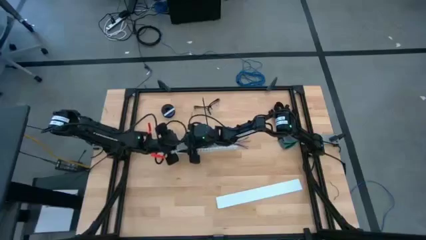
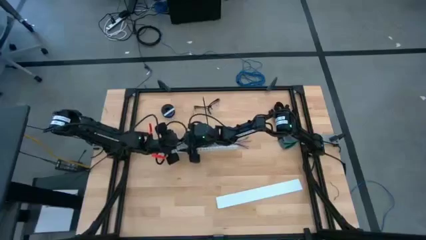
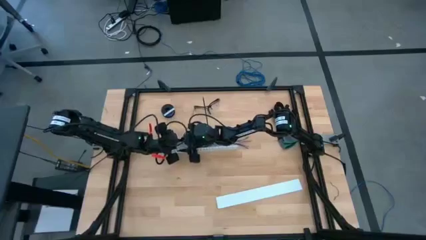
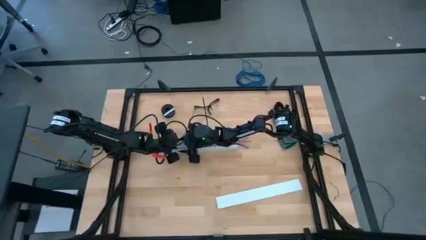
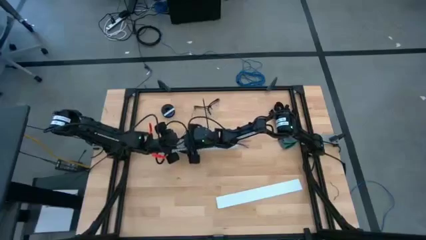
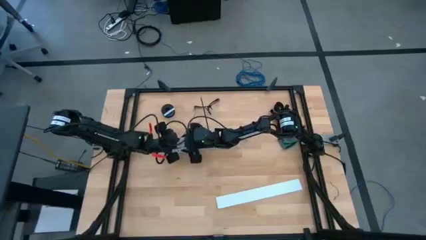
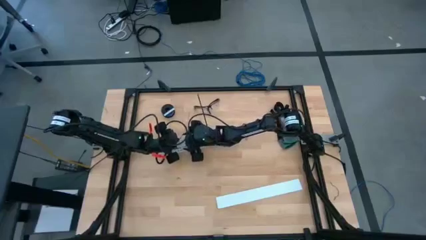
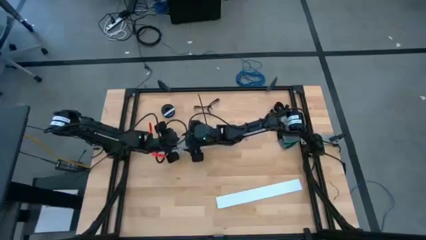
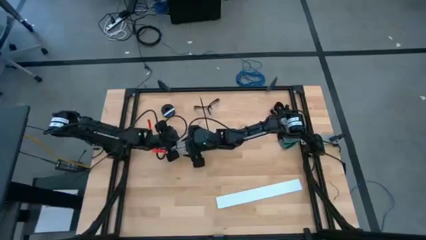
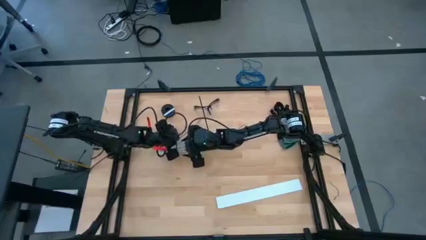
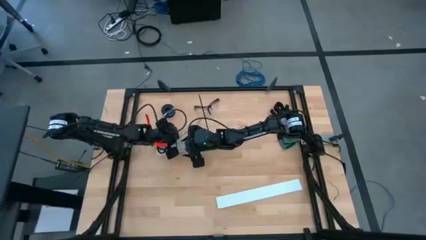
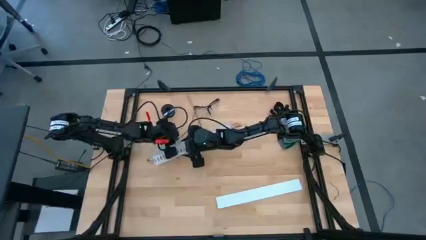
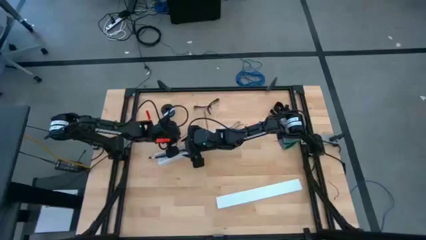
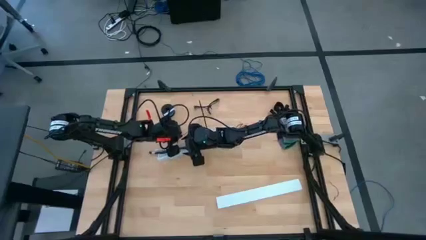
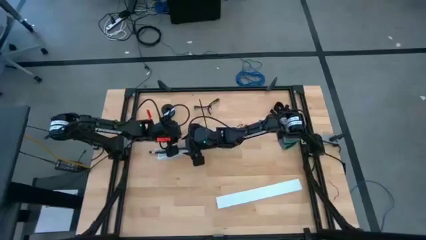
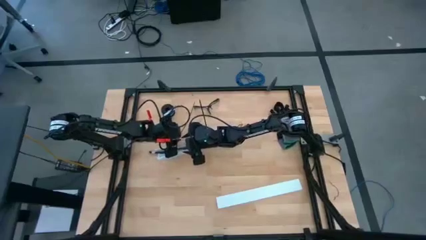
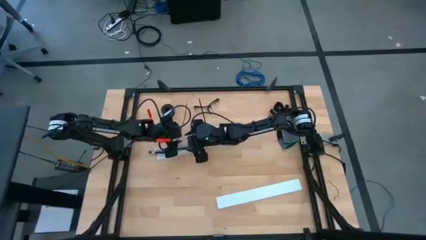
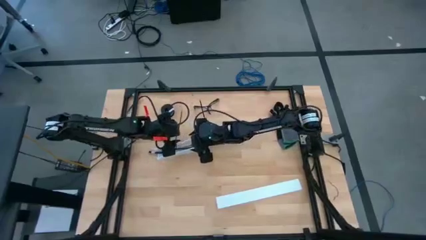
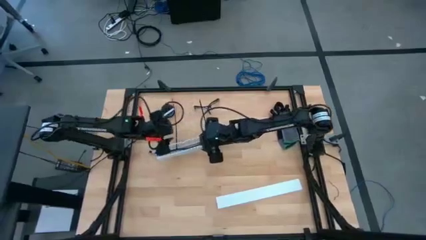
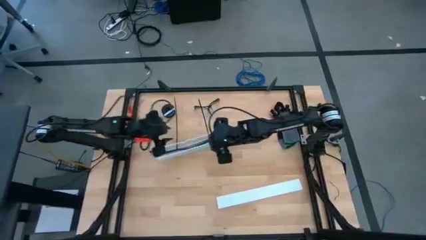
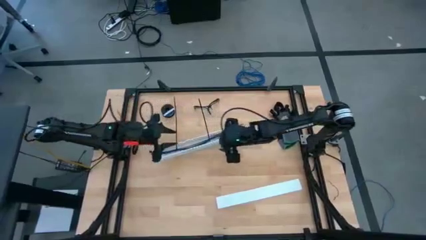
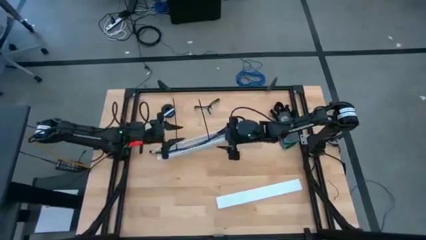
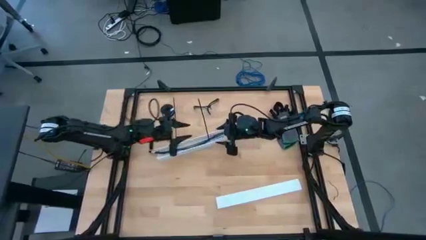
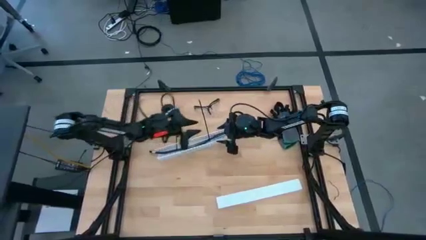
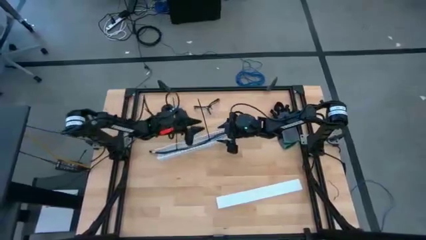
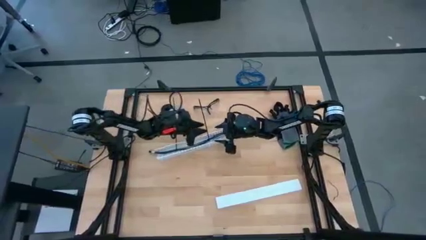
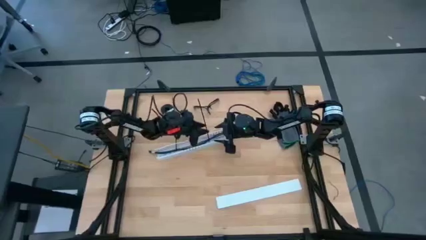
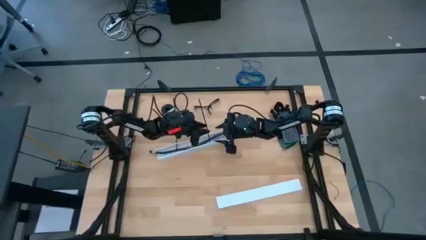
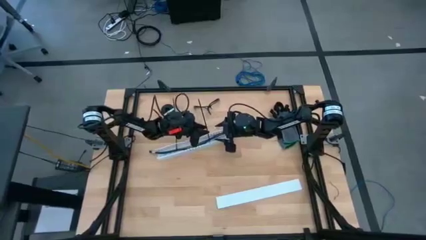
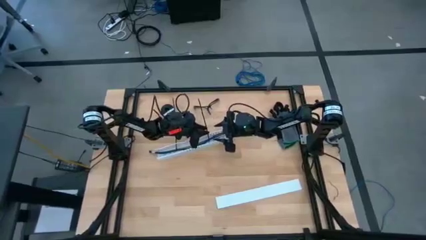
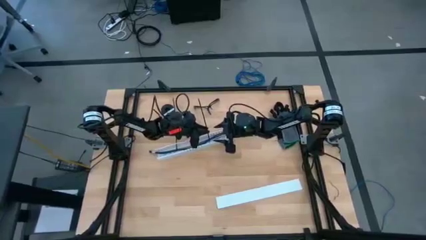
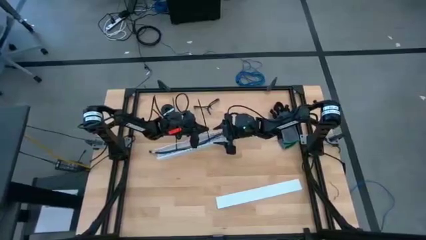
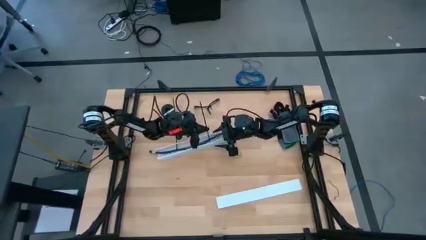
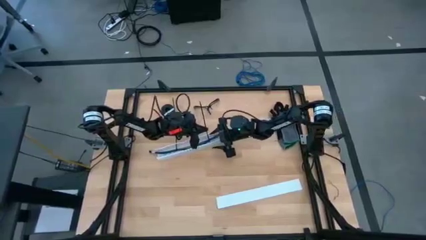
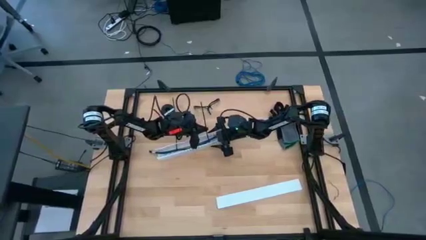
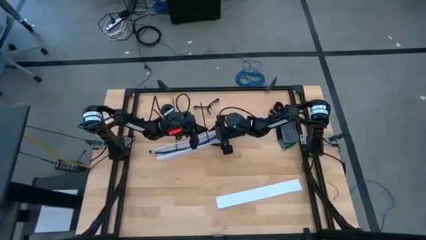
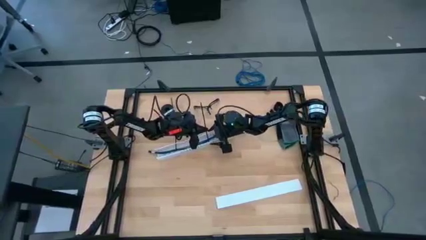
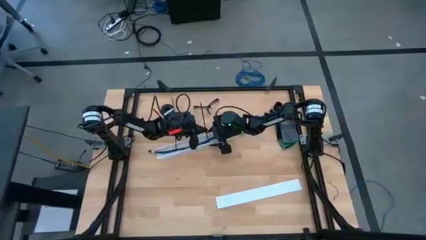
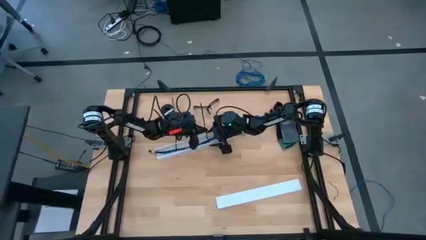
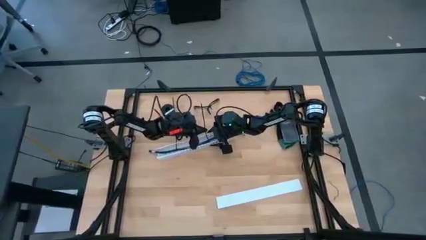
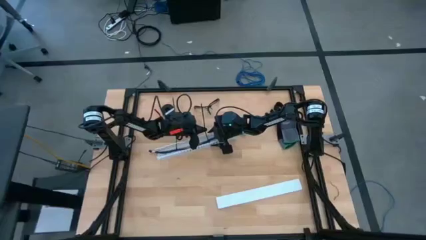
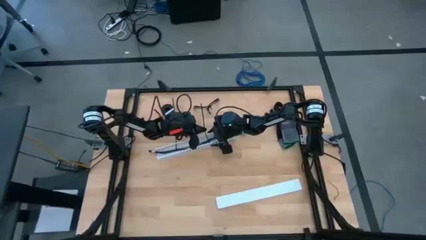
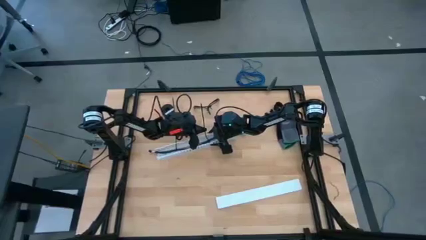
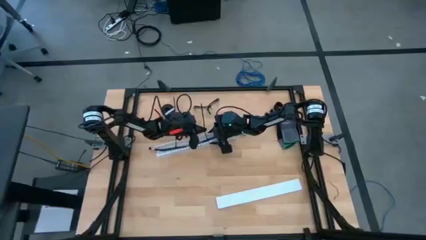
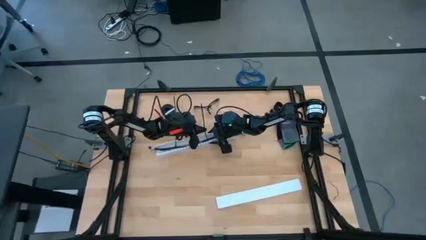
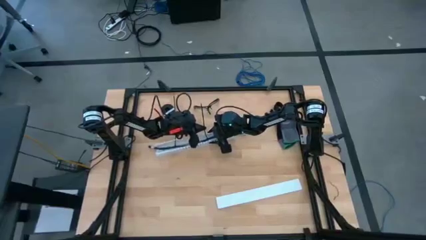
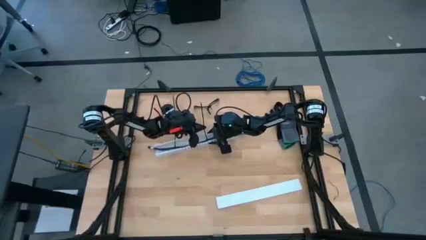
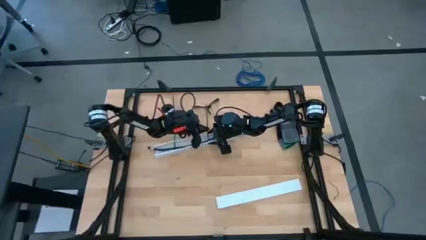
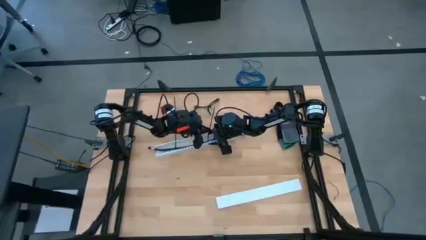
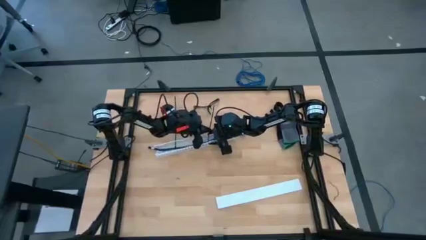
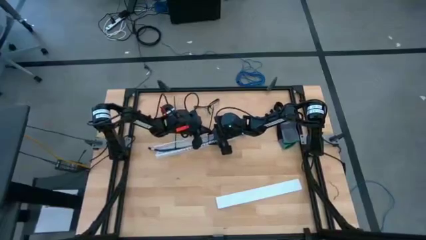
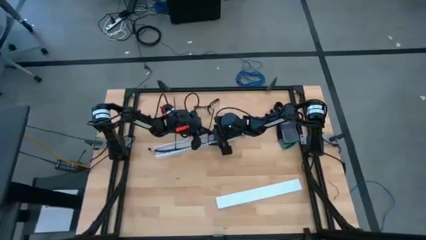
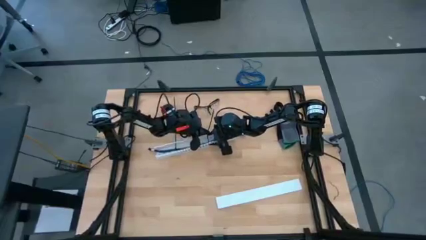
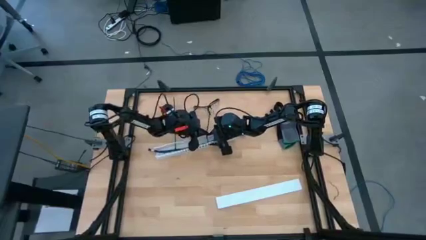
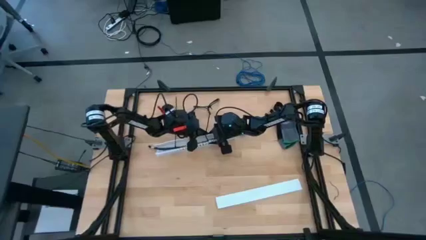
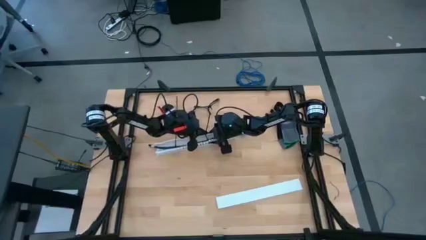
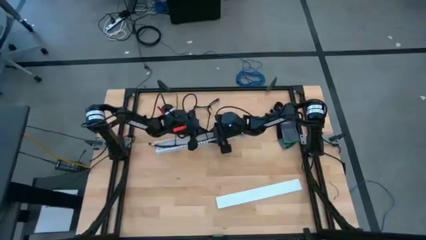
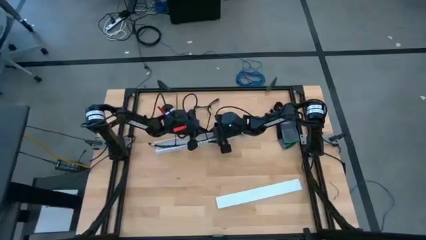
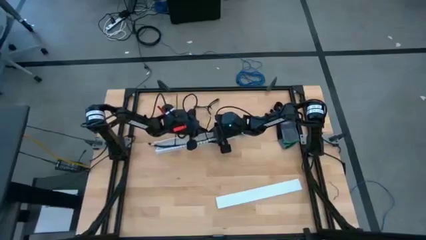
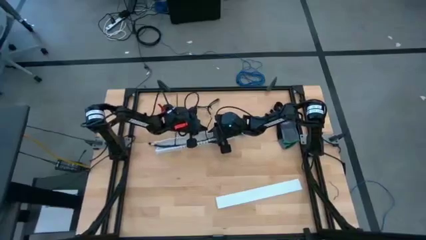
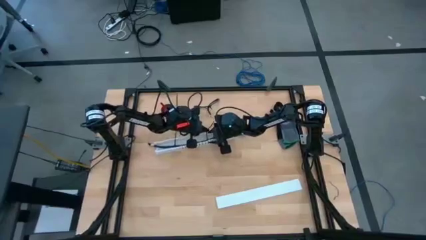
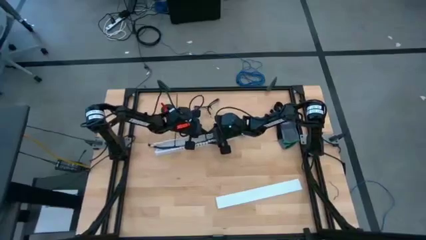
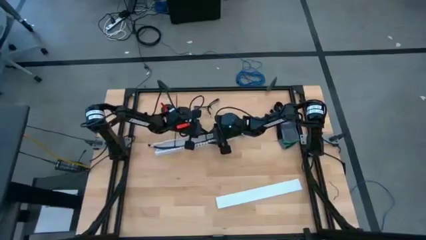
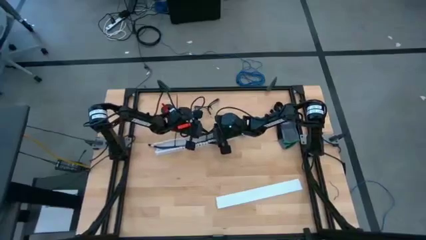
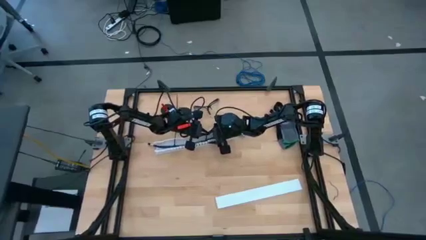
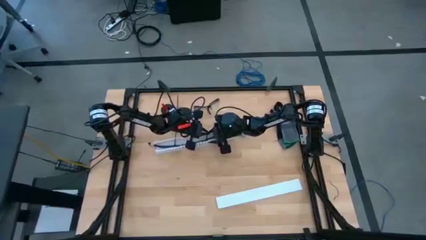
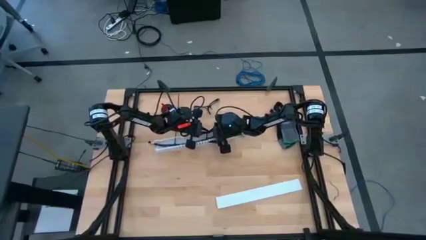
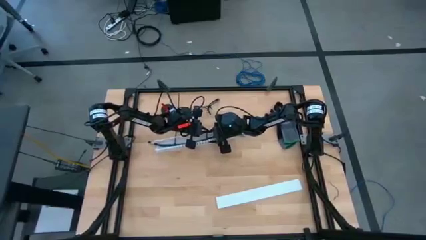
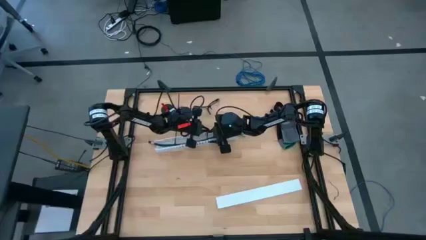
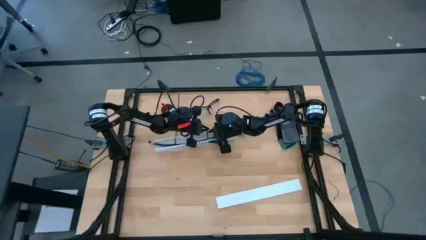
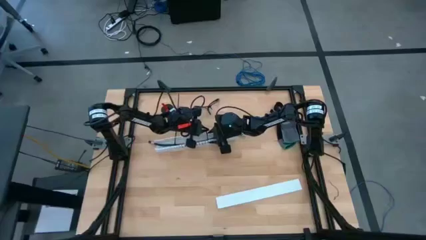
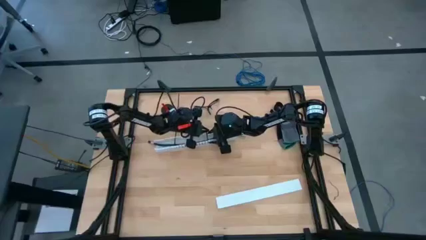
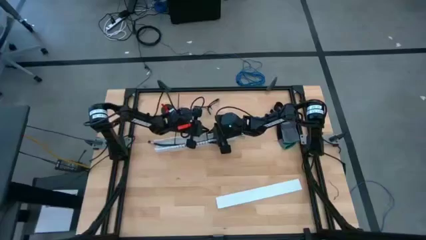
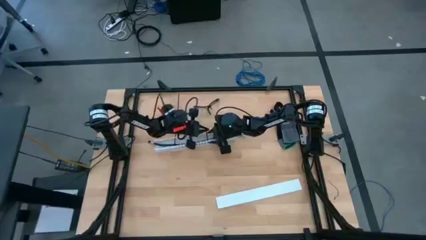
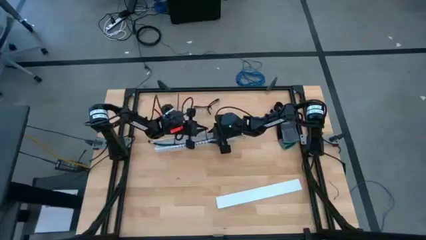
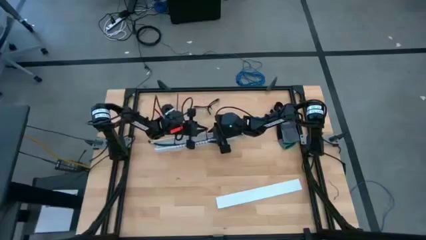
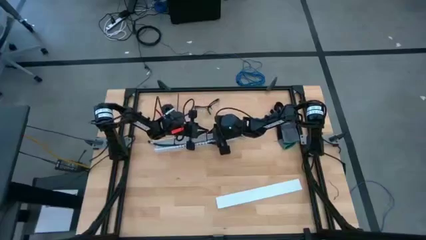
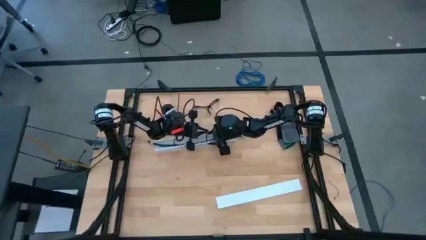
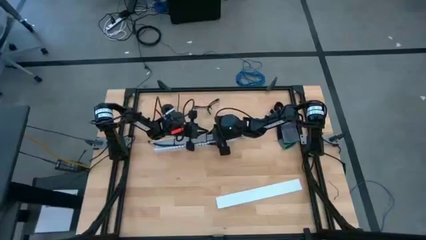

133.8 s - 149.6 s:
Task: Ziptie cables
Put the zip tied cable wires into the white cable duct

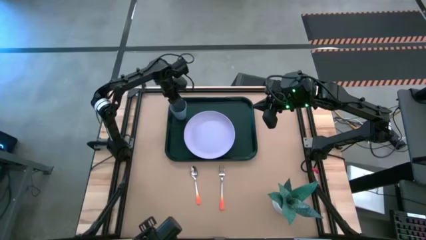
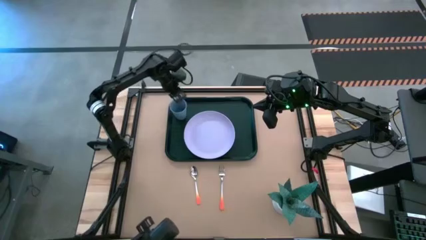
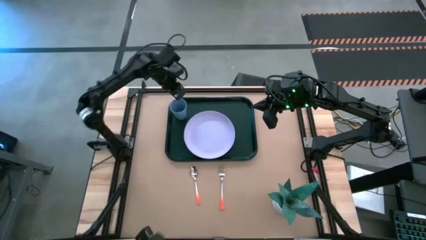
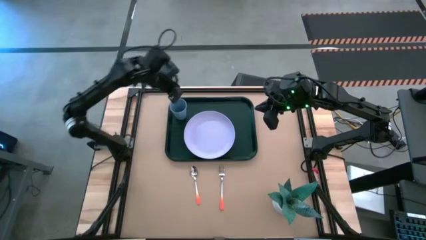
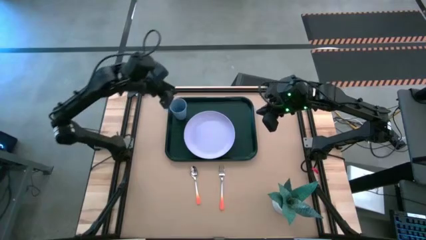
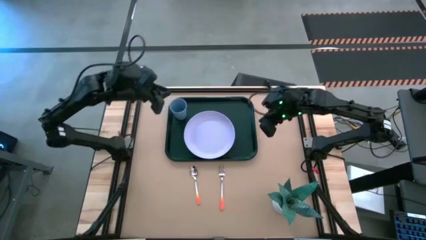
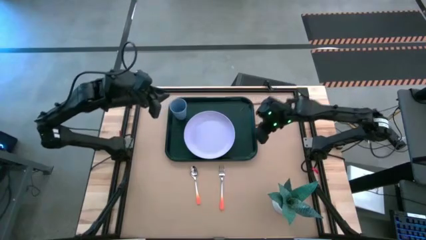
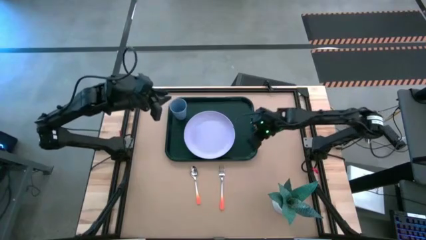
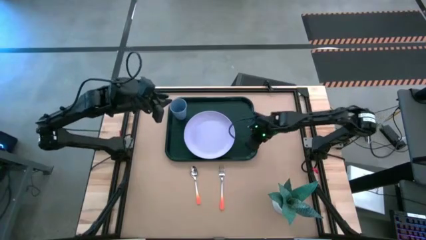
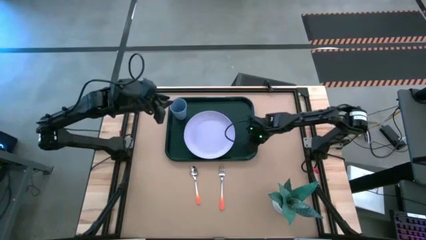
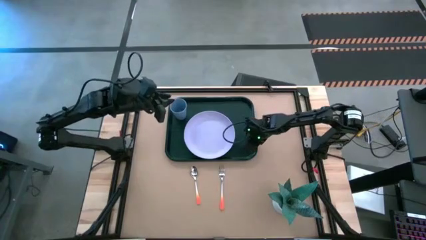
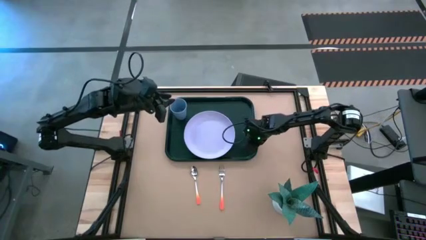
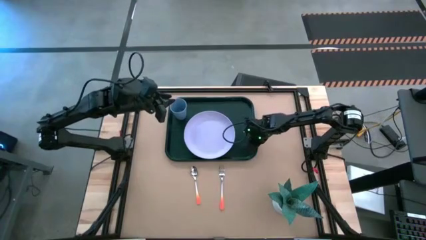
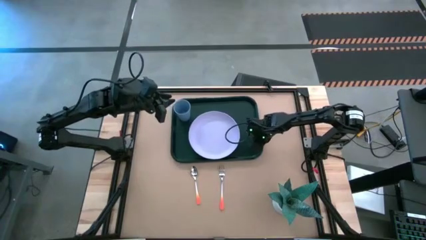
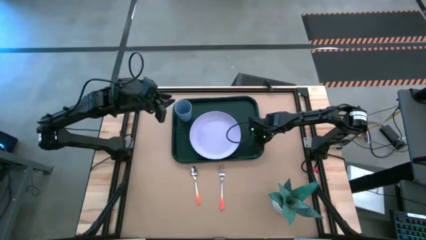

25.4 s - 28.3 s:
Task: Pick and place plate/cup/fork/spoon on tray
Adjust the black serving tray
